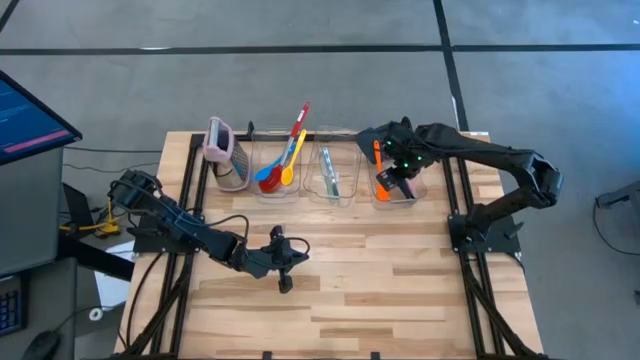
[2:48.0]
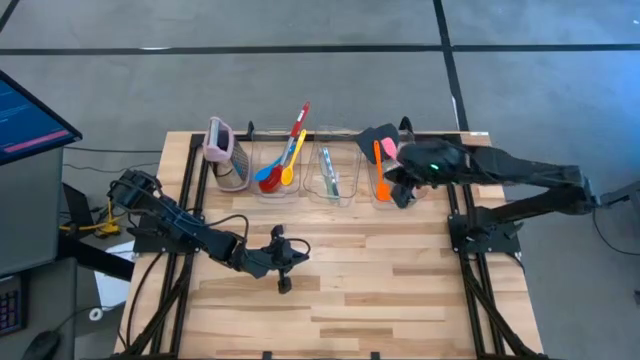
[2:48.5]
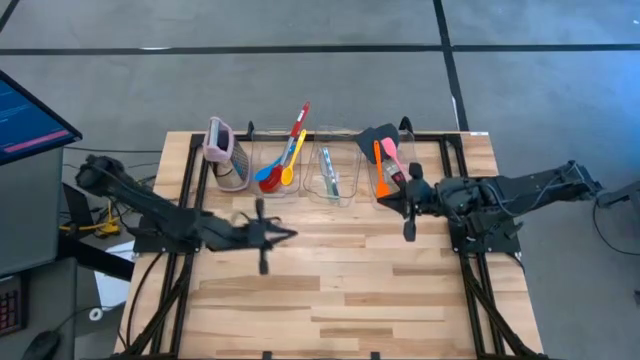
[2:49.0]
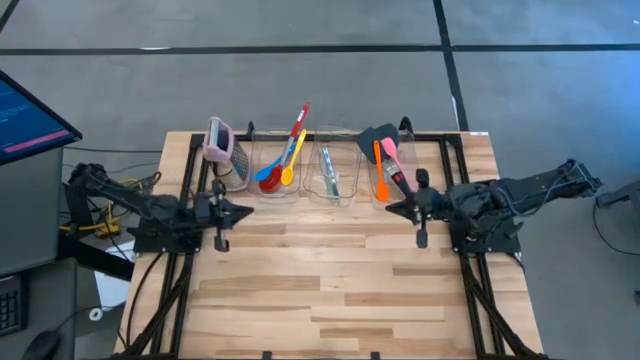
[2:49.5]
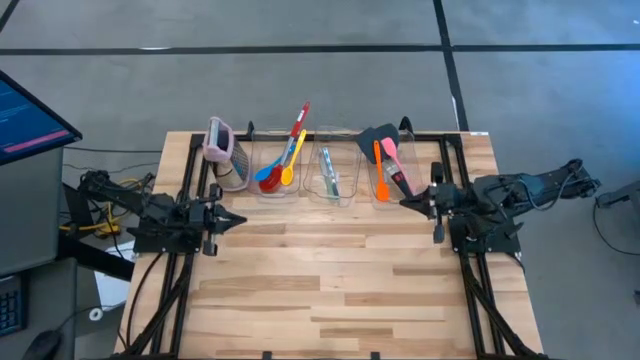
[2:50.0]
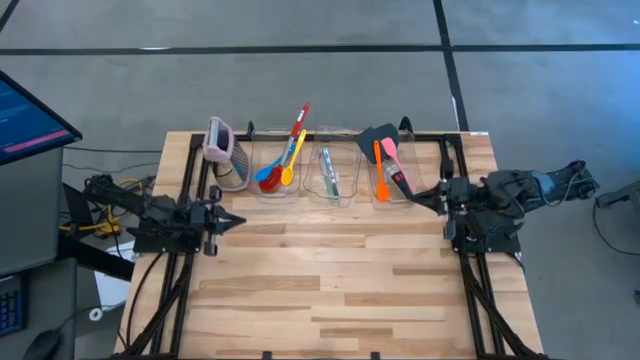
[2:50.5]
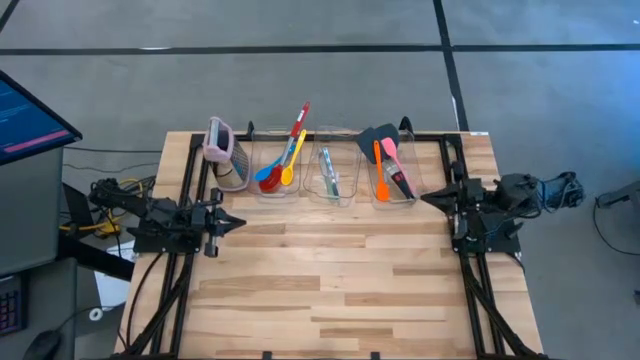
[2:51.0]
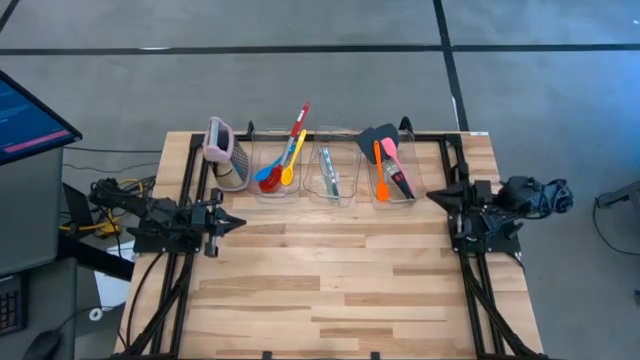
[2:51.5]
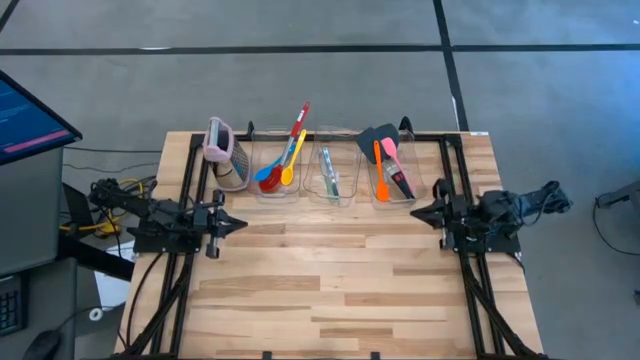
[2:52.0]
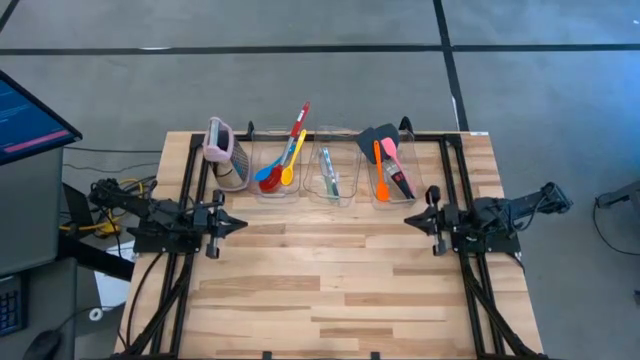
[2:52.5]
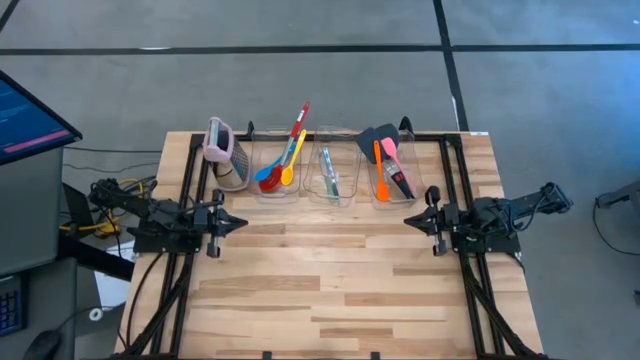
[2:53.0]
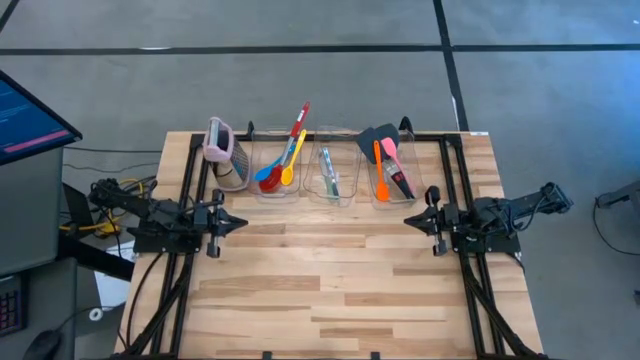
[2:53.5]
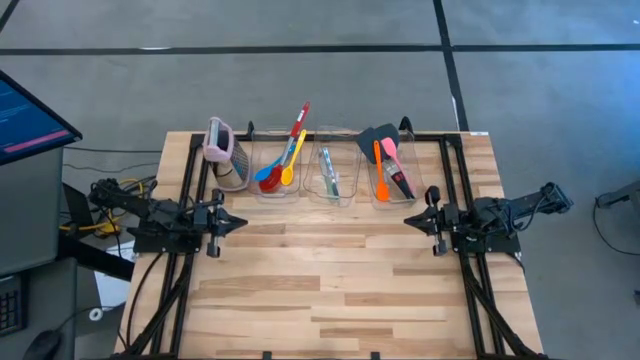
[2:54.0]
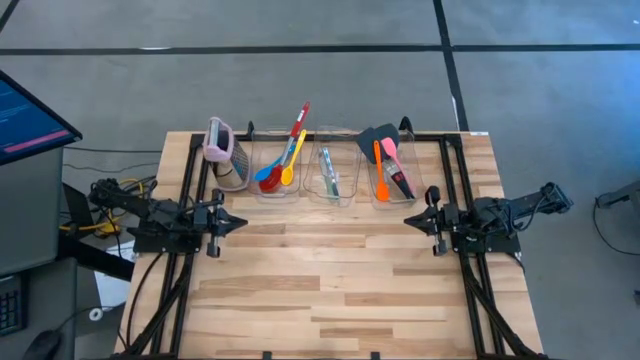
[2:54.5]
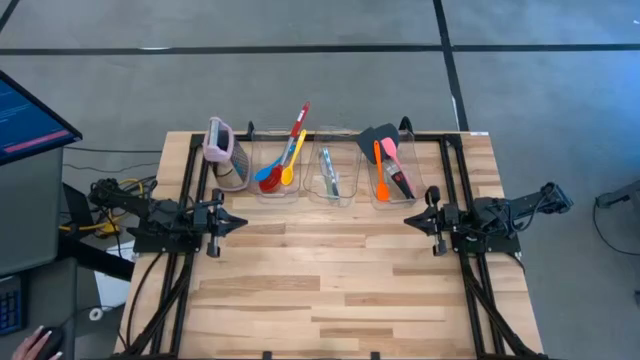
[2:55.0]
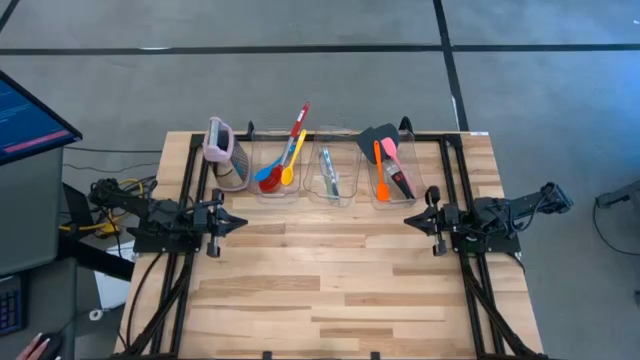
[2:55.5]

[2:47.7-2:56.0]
Task: Pick & Place Kitchen Items
Return to Home Position

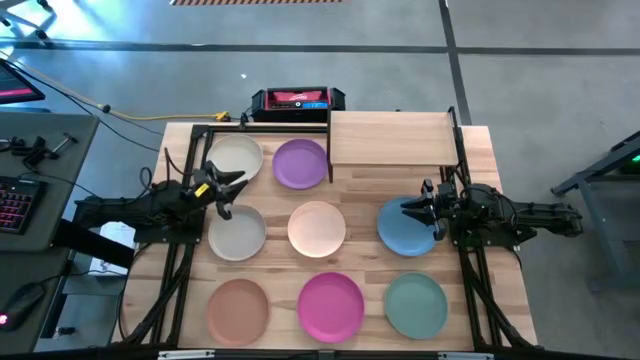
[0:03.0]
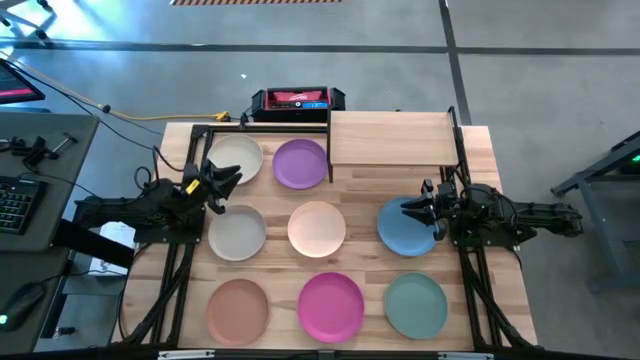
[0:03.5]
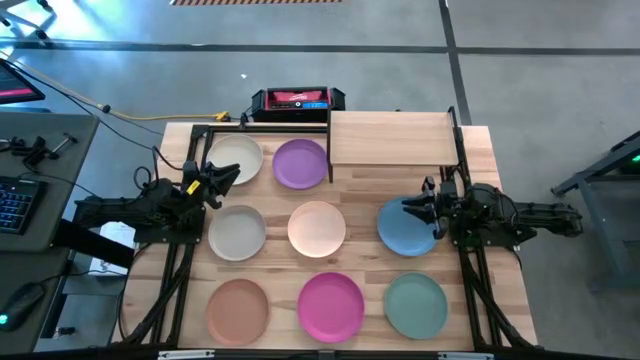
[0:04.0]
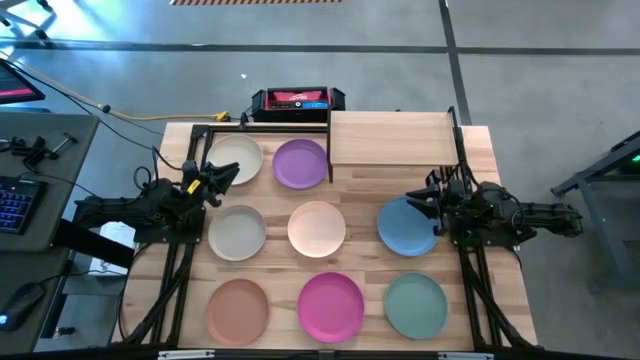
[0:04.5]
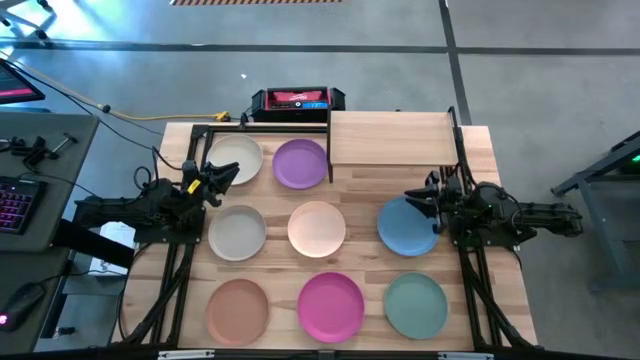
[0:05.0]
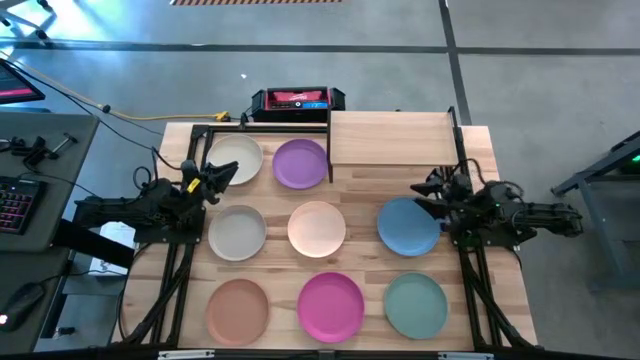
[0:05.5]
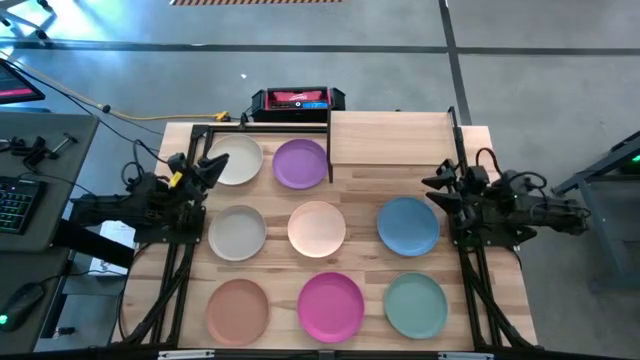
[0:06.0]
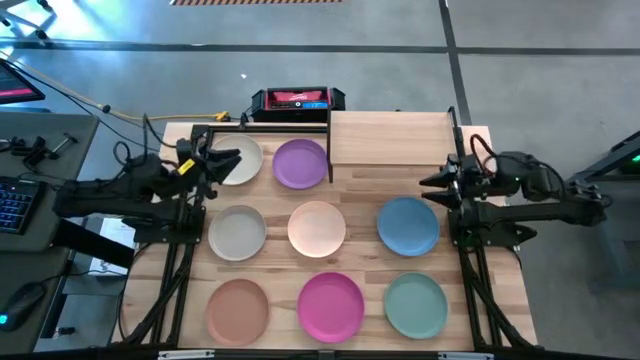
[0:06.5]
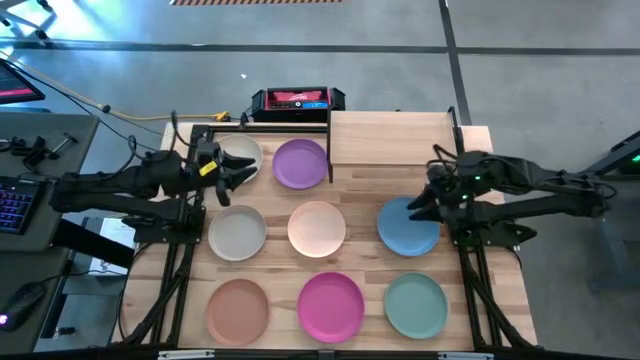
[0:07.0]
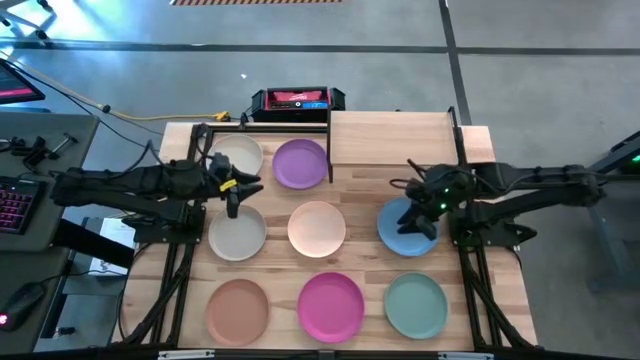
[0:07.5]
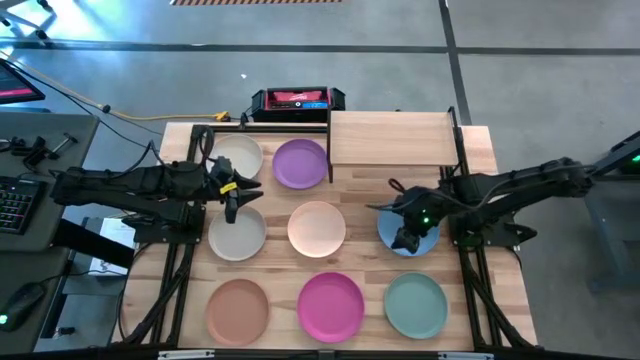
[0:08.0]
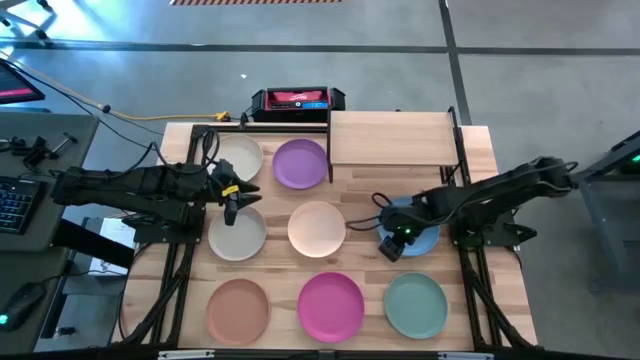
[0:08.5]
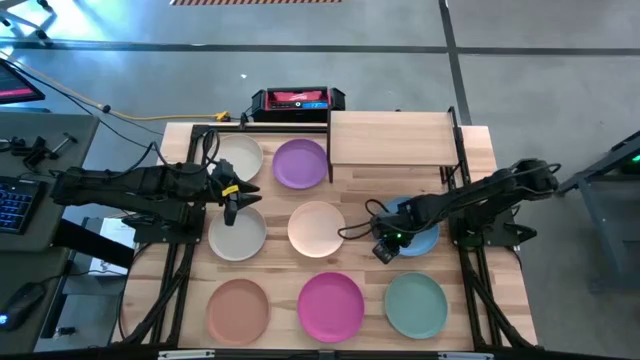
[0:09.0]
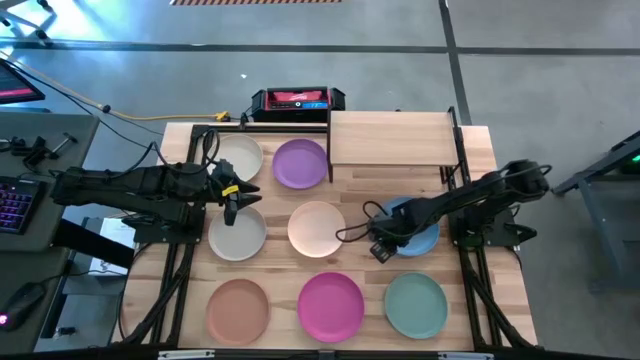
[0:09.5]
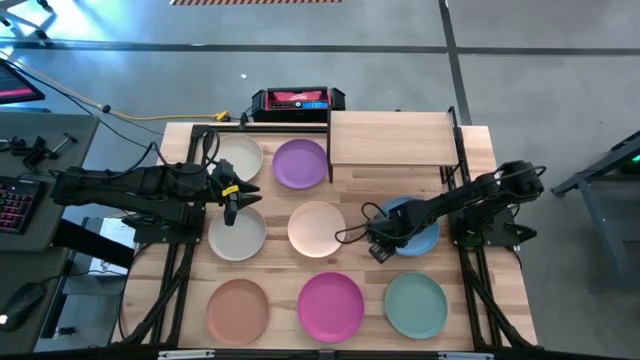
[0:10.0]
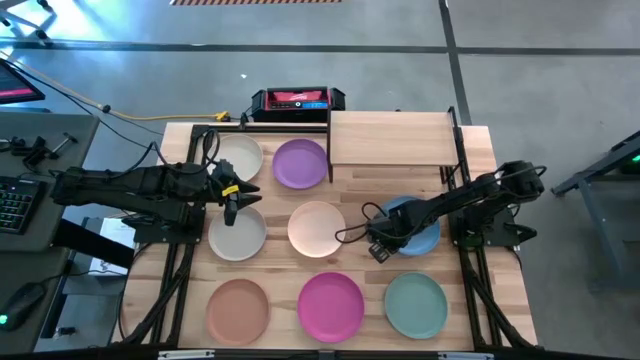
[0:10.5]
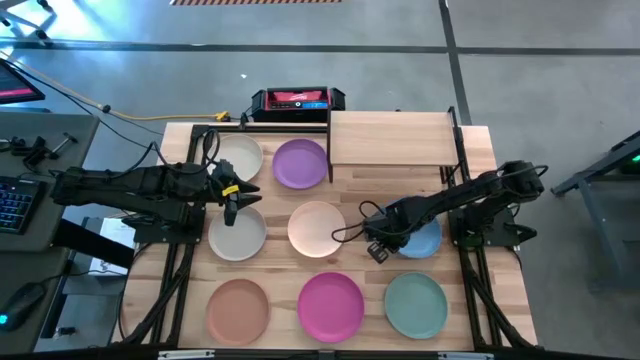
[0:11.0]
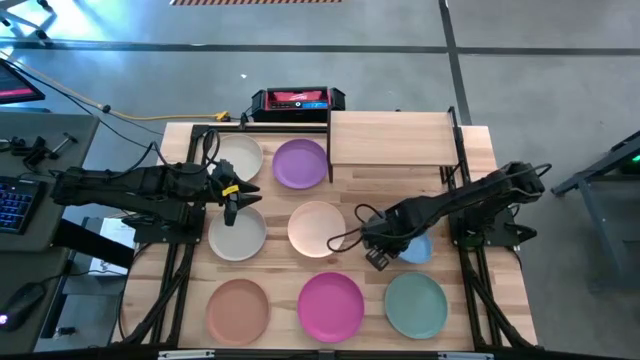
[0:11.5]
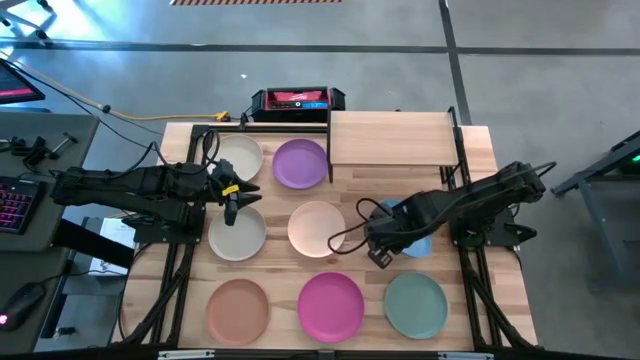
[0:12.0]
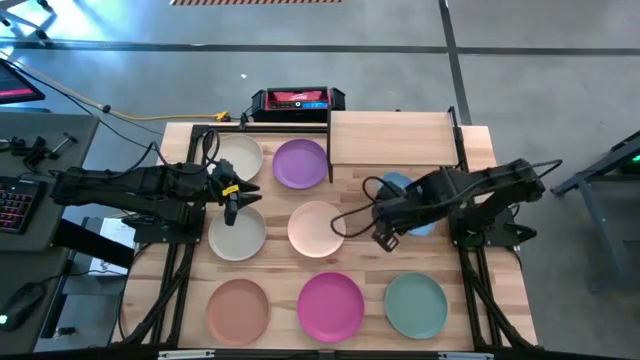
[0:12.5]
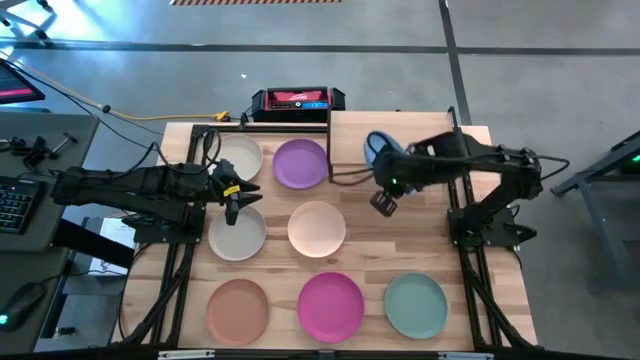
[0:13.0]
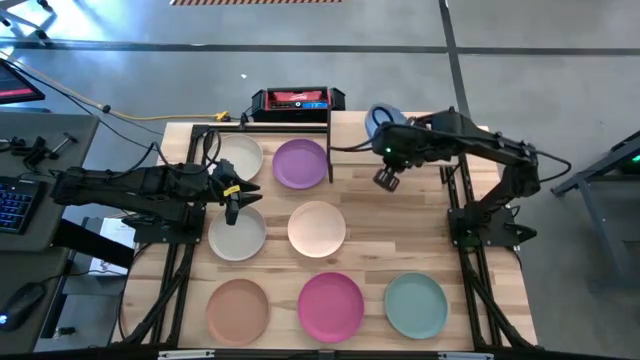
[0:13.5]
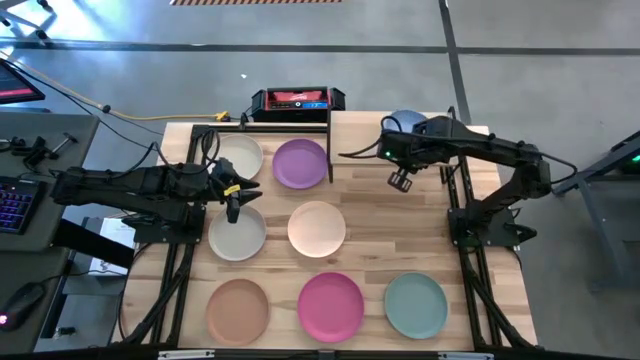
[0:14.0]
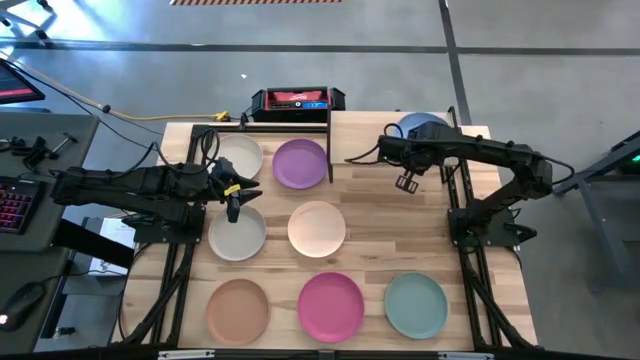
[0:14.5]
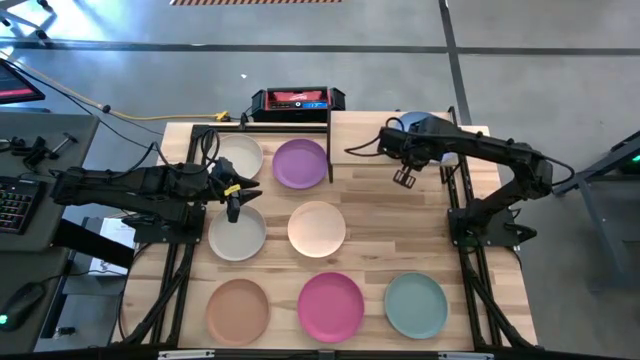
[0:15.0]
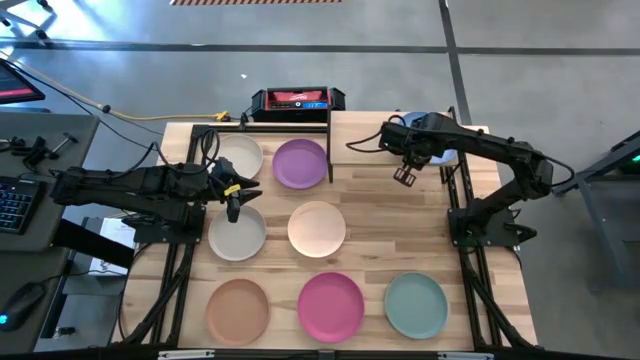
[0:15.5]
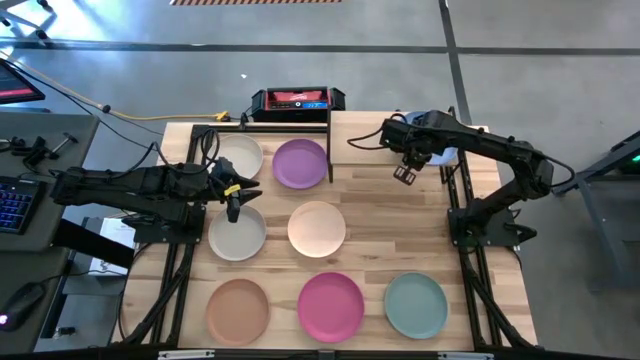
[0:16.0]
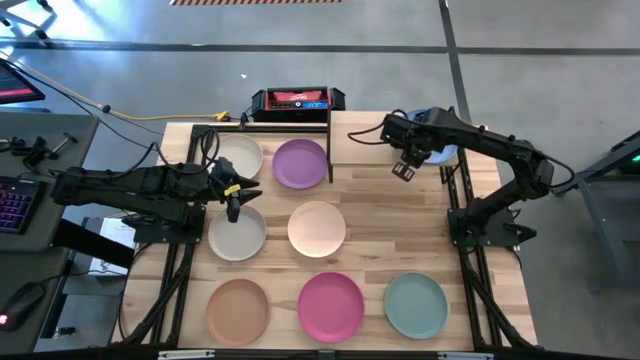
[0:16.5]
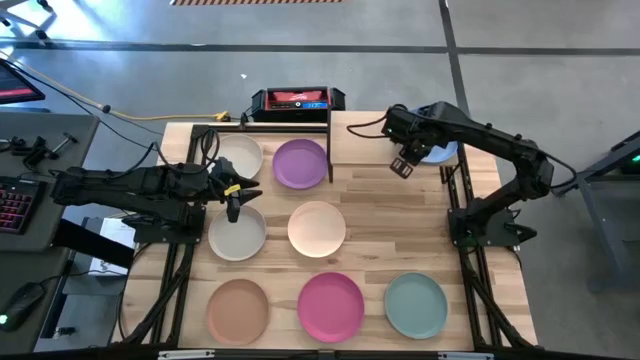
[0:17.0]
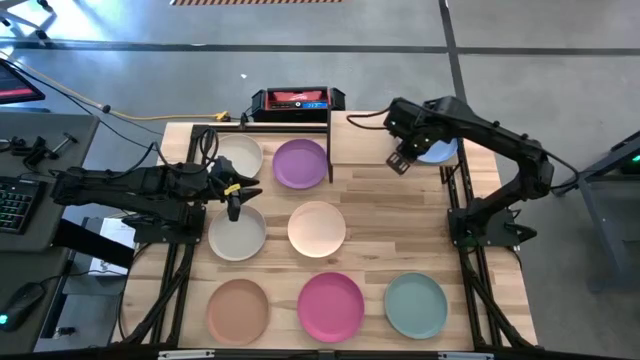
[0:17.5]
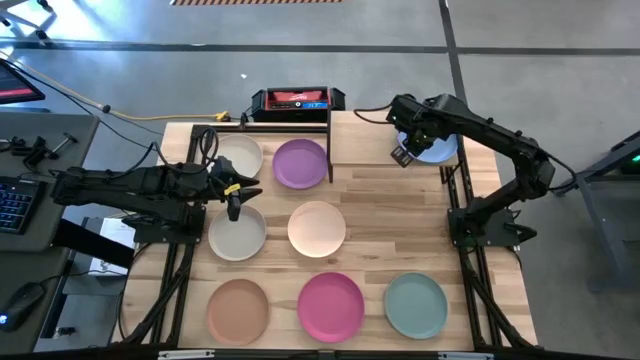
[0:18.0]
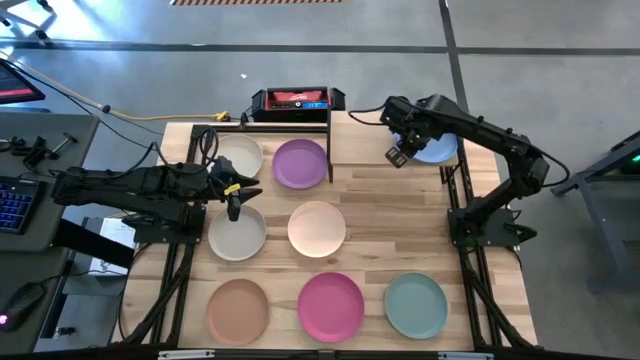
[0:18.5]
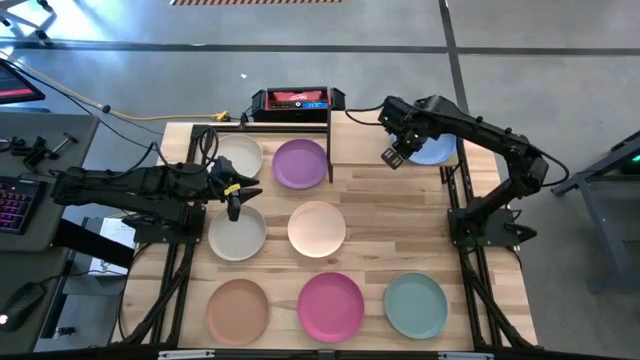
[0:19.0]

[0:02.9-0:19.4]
Task: Place and stack plates onto a shelf
Put the blue plate on the shelf
